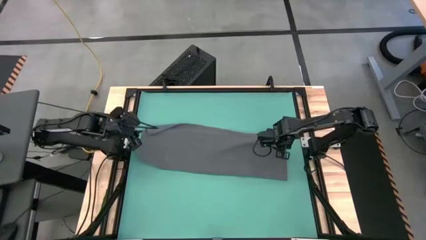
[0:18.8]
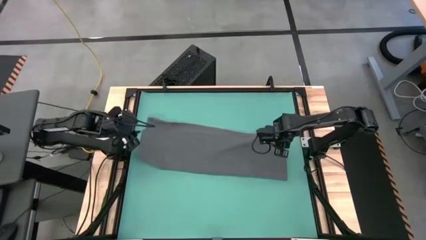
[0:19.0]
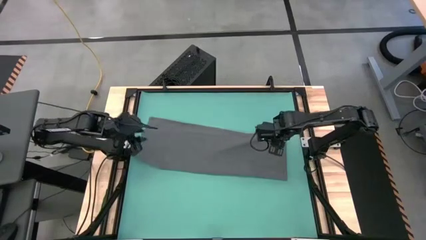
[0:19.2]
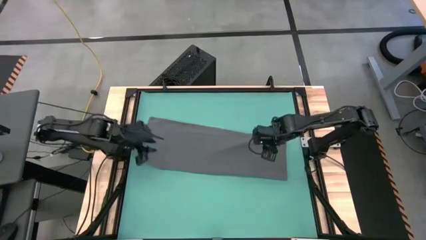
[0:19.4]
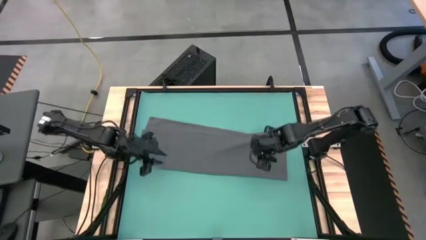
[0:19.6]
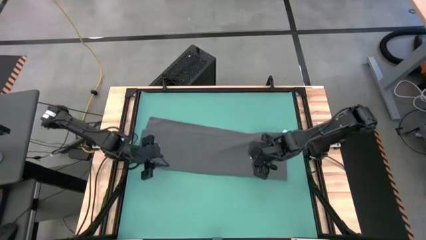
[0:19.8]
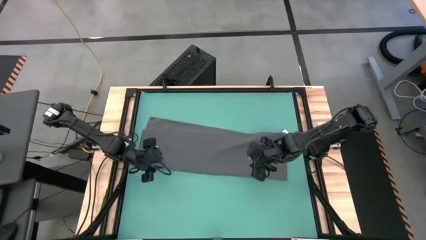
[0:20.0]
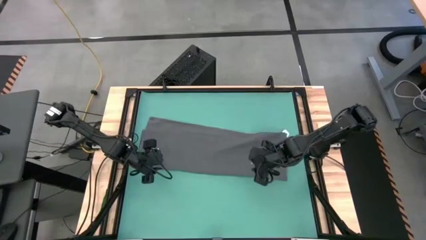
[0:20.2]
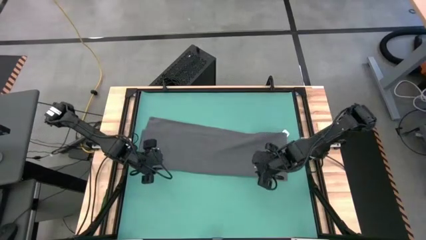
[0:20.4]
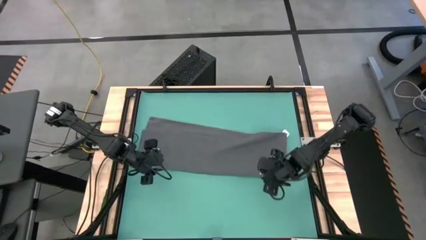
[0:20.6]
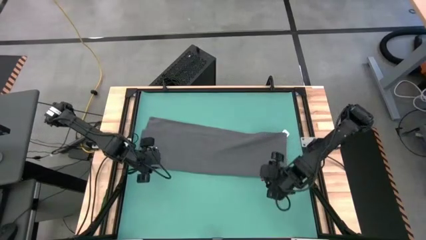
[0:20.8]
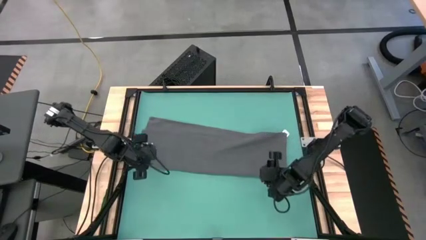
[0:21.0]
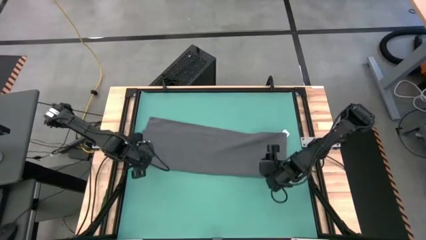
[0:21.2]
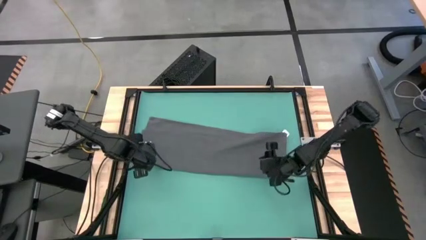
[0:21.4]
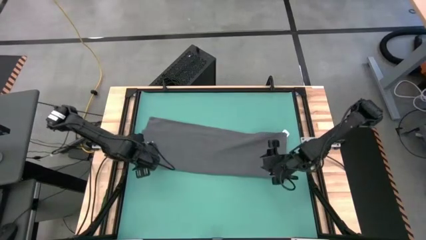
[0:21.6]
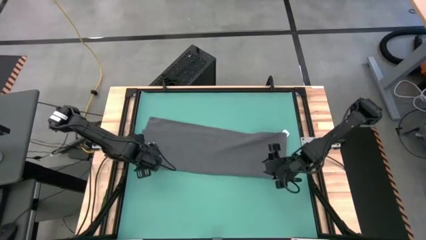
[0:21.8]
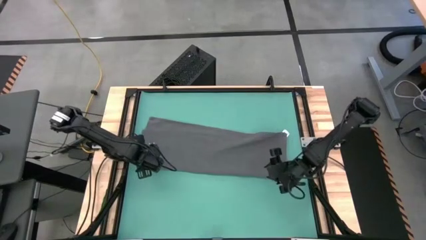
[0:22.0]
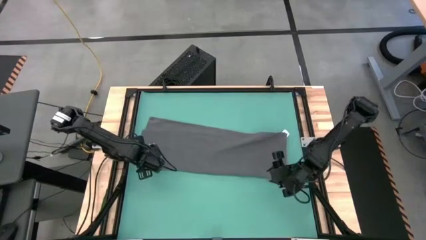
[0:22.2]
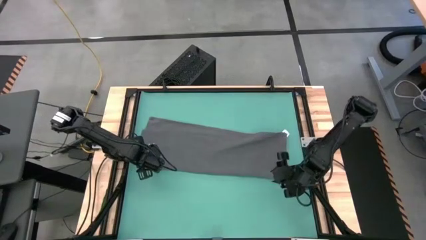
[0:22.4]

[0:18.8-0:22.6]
Task: Roll towel into tight, uniform cylinder
Fold the gray towel

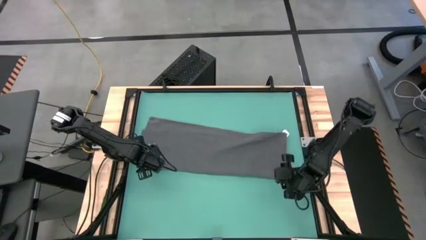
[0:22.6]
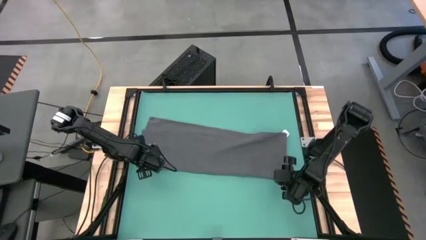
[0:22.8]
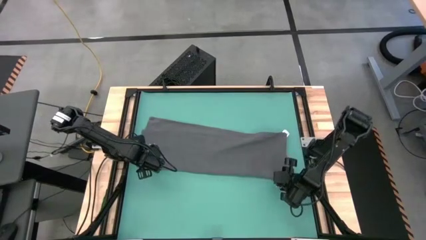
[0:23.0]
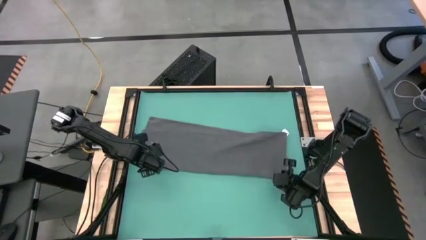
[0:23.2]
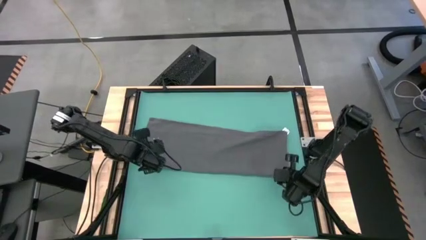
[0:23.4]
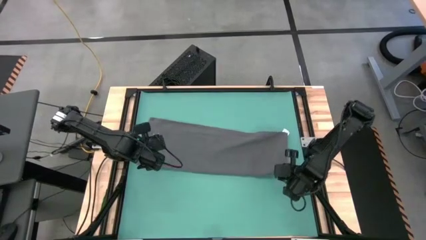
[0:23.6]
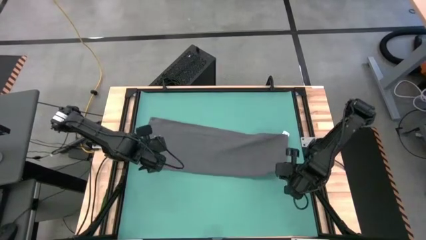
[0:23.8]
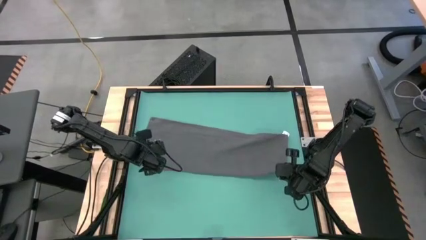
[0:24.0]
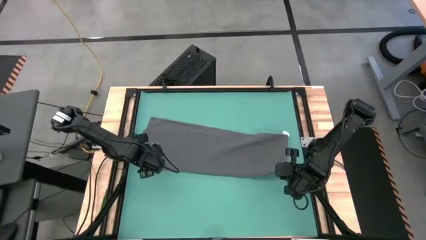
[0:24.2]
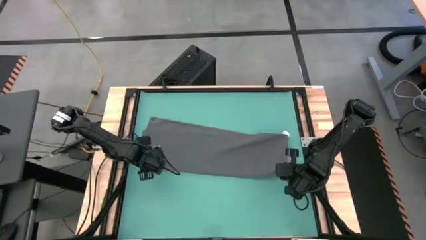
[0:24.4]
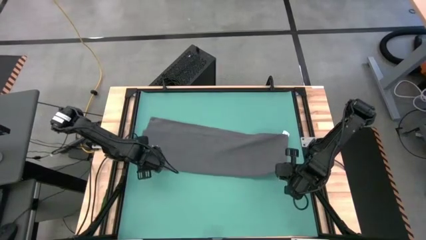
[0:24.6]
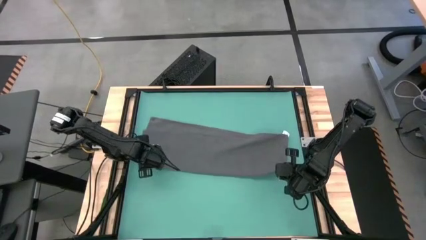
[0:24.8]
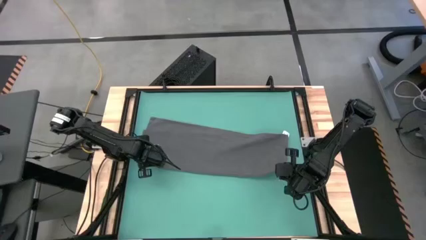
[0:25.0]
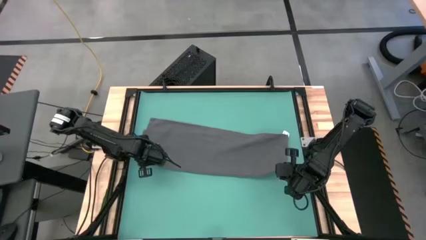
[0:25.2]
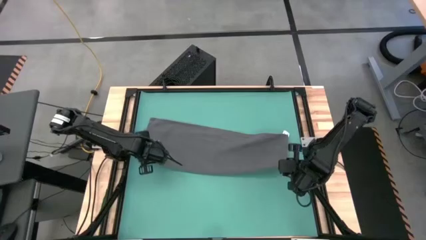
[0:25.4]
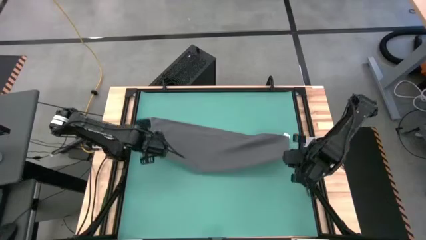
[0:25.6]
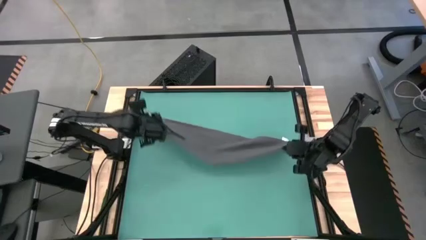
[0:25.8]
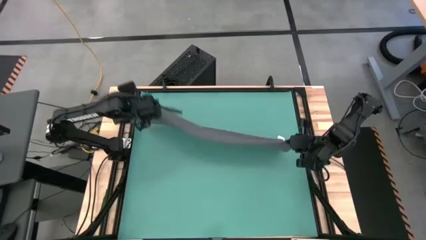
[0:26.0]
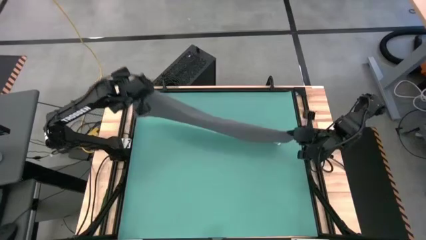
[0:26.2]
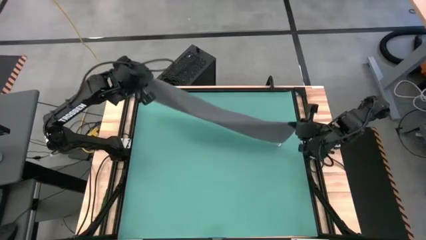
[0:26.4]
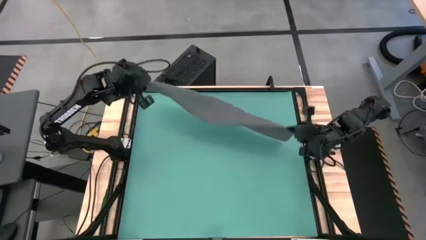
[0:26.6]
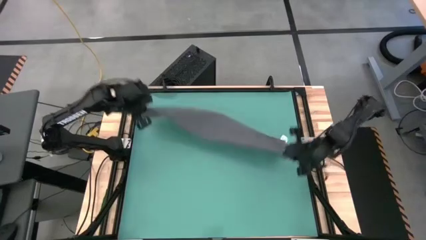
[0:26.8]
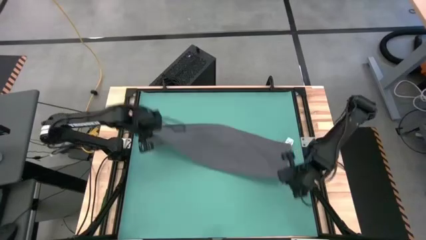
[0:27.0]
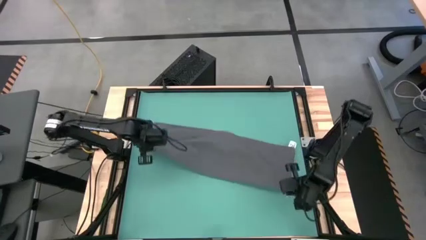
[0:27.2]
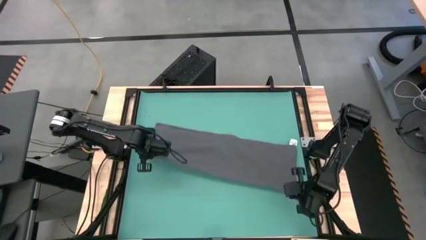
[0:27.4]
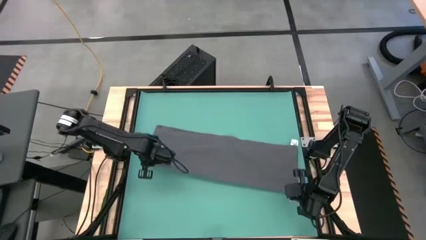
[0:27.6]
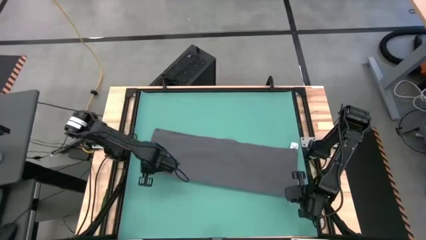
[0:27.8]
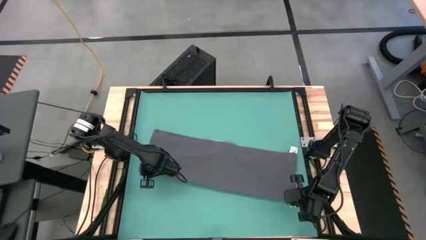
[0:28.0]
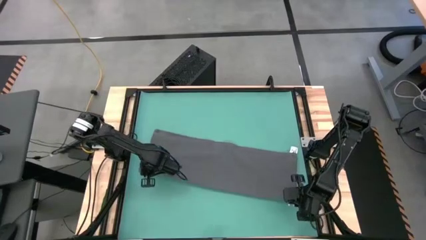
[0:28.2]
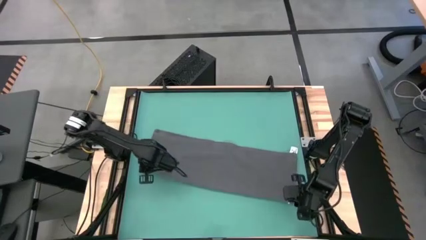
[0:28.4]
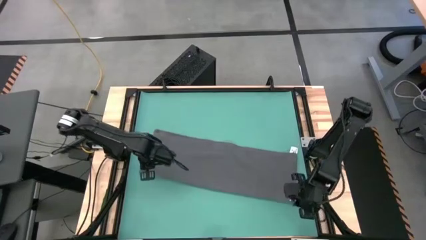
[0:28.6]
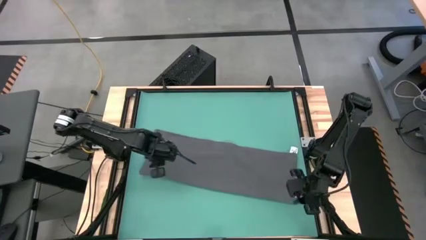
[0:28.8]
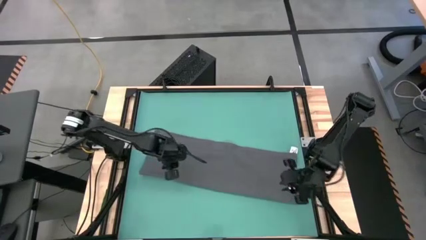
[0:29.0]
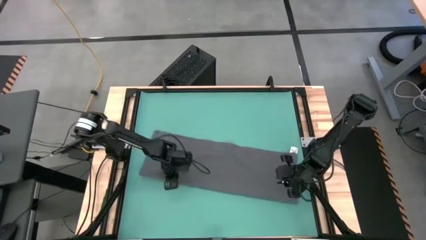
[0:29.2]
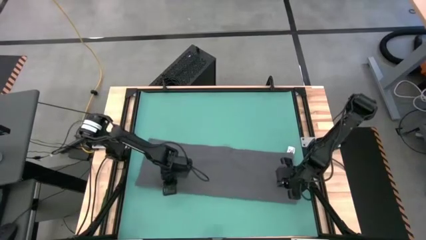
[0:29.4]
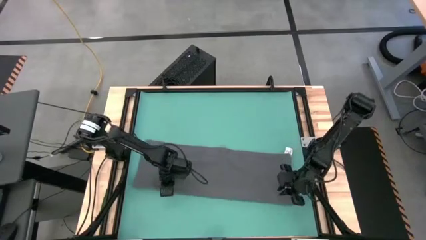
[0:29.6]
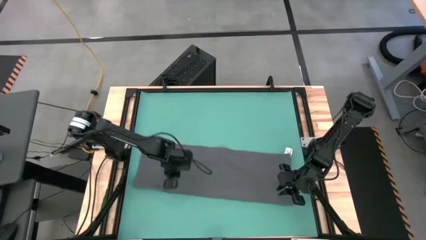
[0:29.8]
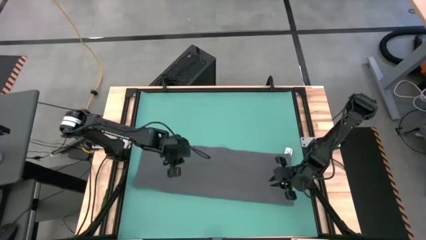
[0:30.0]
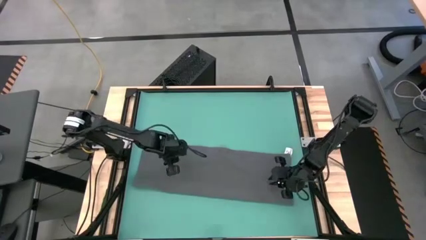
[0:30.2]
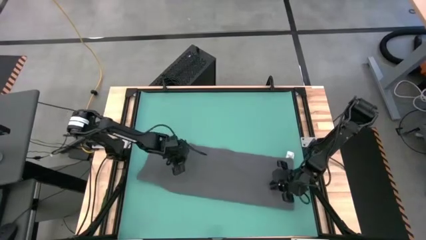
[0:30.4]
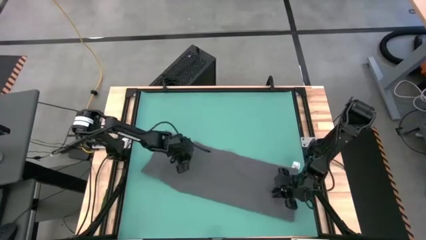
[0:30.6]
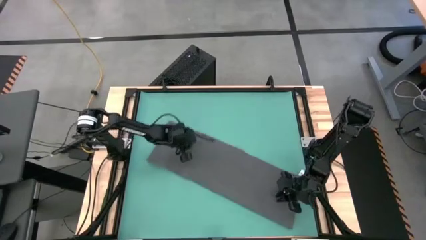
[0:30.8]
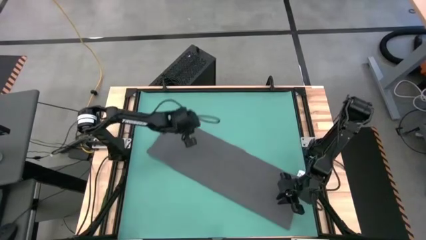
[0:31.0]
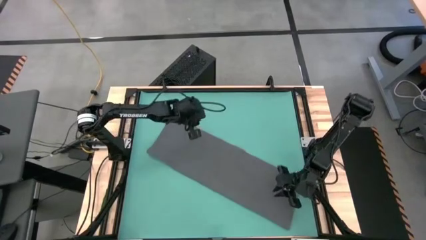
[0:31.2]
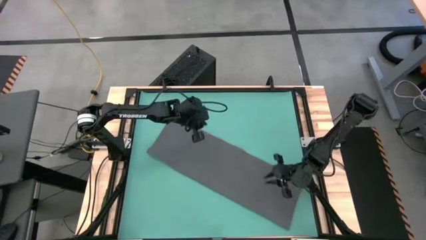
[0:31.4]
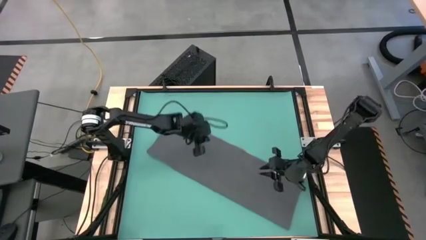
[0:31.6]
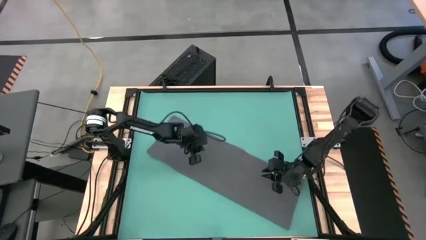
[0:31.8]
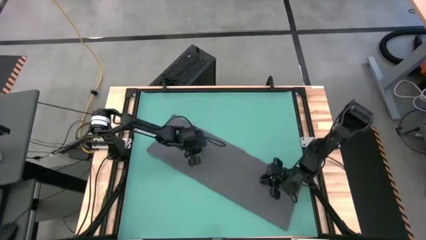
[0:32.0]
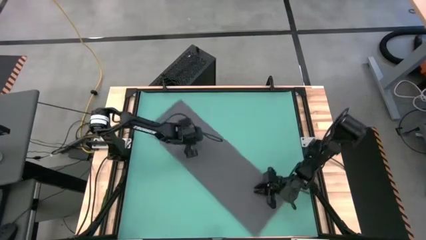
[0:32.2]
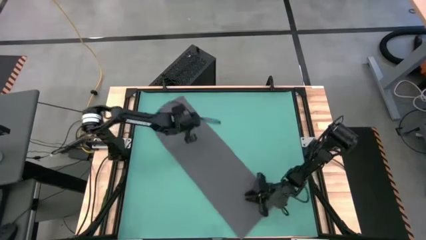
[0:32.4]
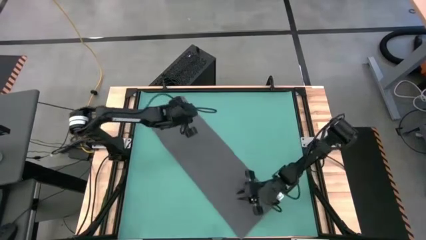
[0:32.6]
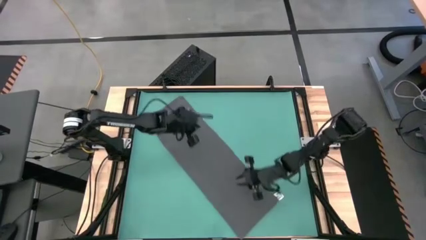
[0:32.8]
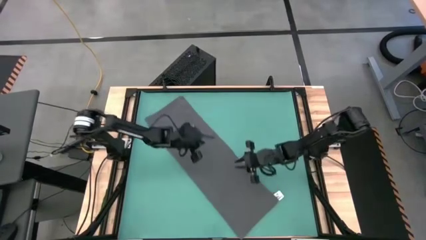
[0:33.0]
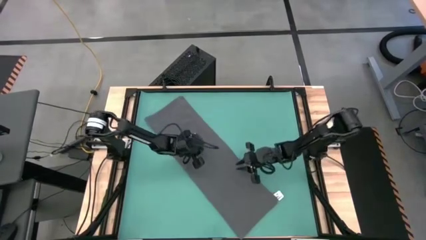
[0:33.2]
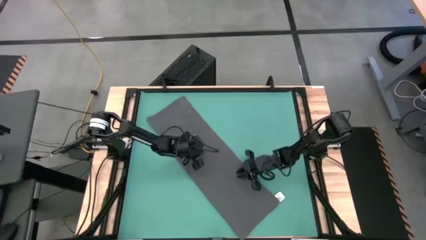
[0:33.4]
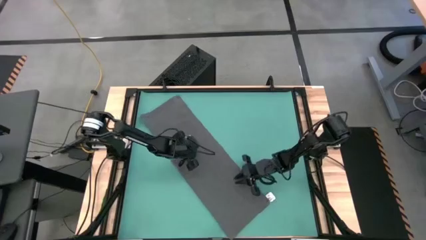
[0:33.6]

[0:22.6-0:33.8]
Fold the gray towel
